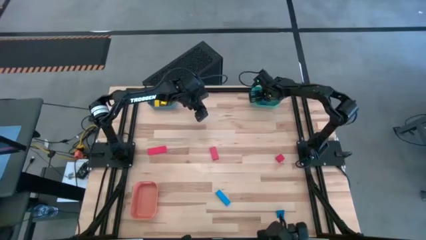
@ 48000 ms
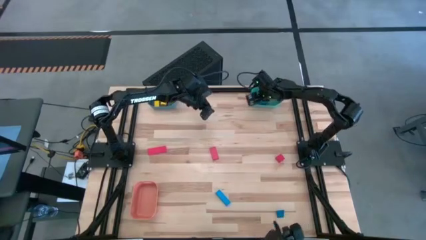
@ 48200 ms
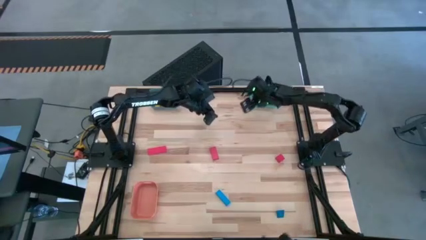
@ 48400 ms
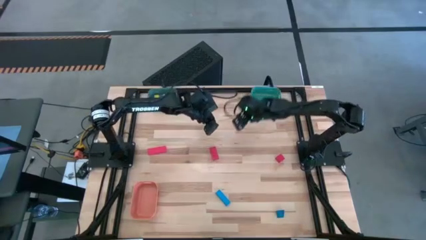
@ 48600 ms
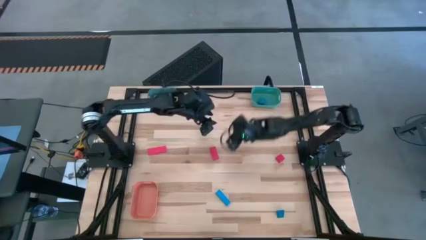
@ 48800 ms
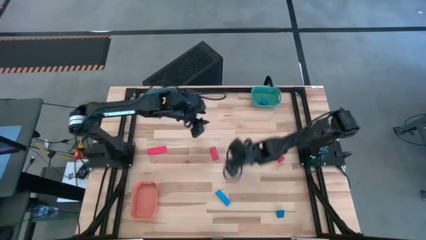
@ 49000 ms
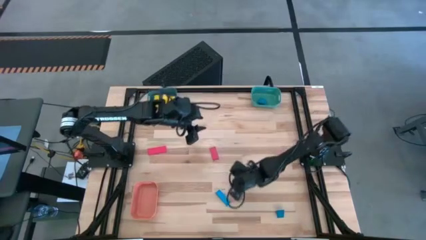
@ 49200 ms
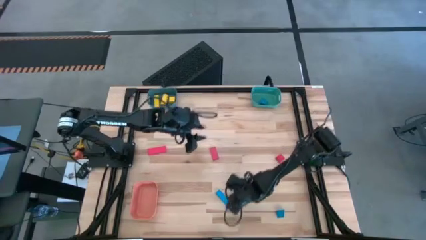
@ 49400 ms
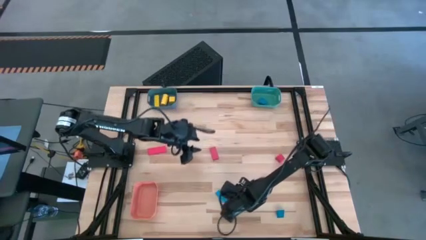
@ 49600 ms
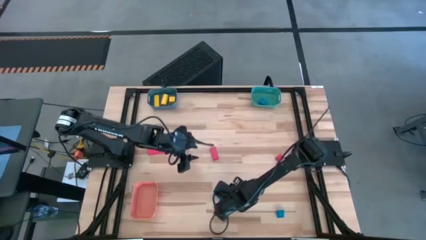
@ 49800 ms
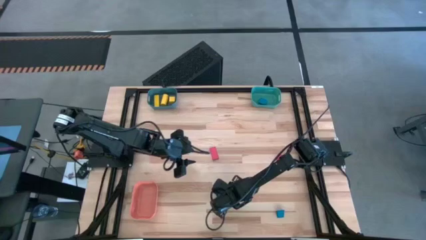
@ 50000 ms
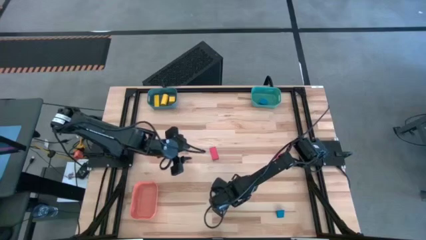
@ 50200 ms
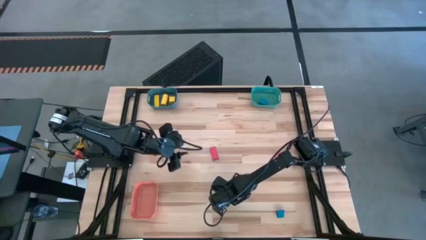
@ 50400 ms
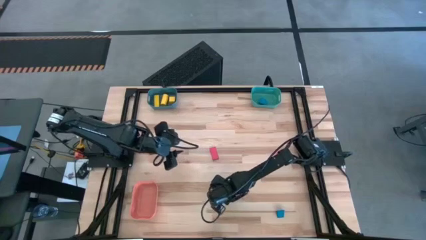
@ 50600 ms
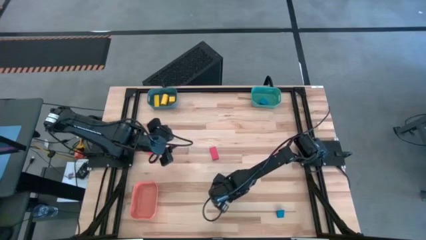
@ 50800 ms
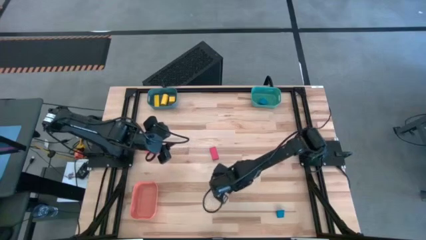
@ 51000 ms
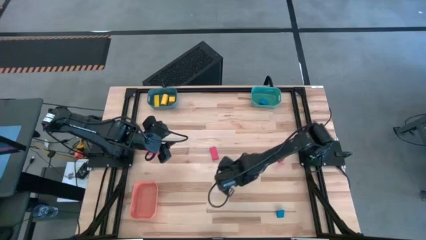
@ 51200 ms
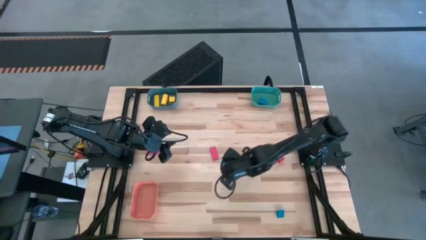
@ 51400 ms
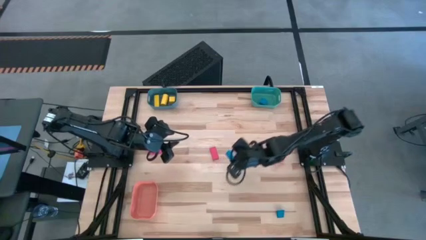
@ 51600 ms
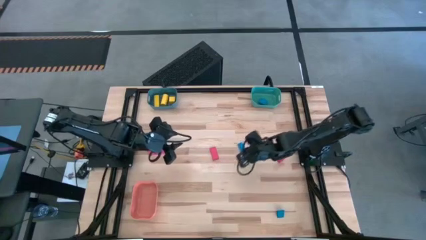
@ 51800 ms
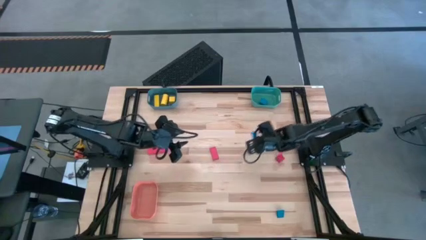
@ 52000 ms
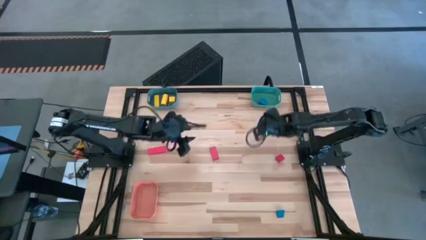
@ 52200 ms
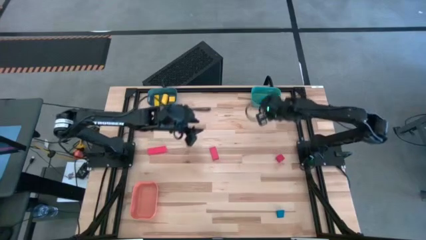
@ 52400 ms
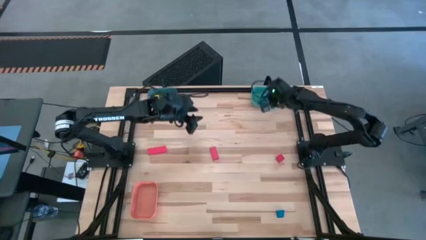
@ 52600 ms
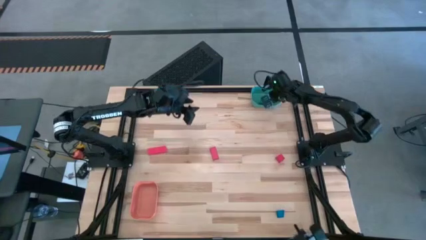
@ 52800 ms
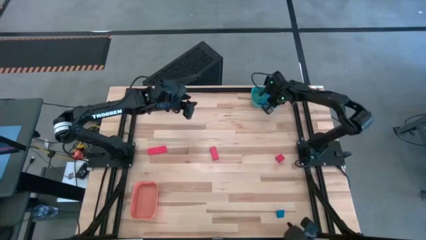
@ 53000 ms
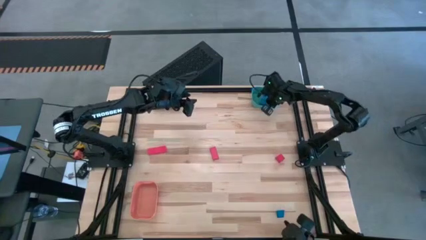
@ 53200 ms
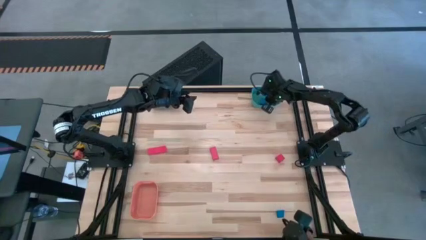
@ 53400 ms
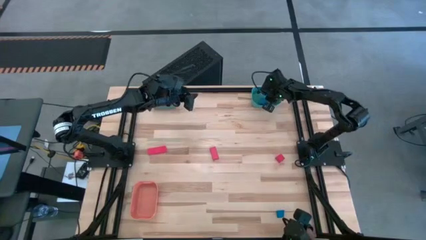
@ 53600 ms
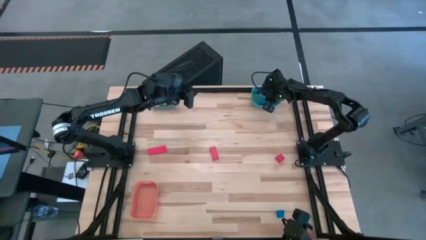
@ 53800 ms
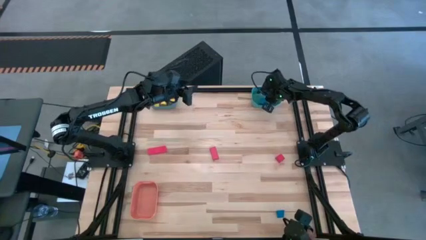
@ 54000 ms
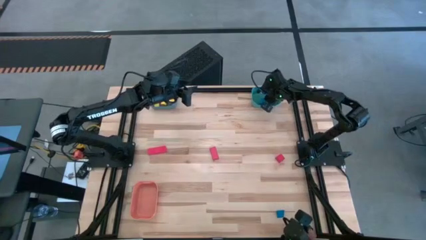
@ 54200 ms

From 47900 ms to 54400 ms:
Task: Sort & place blocks by color
Put the left blue block into the green bin

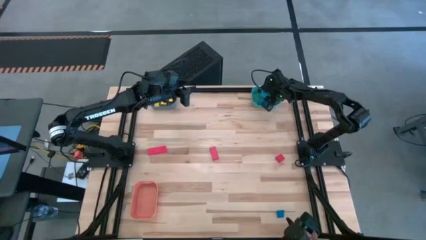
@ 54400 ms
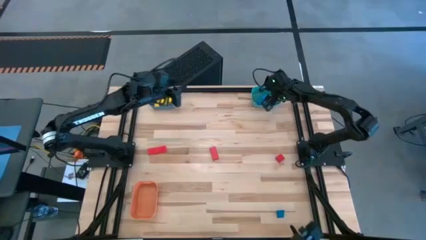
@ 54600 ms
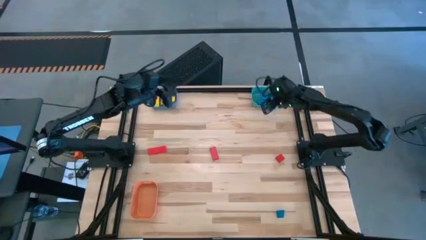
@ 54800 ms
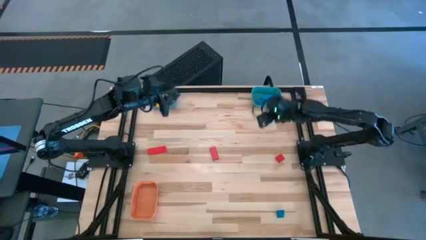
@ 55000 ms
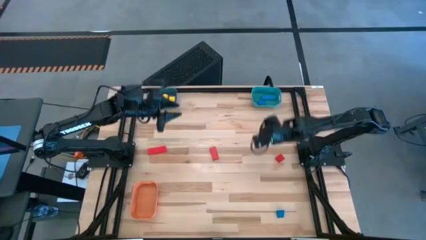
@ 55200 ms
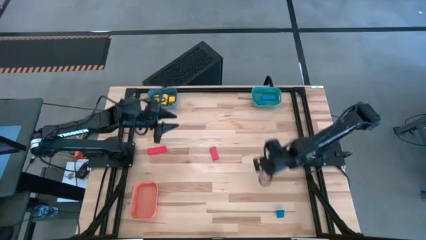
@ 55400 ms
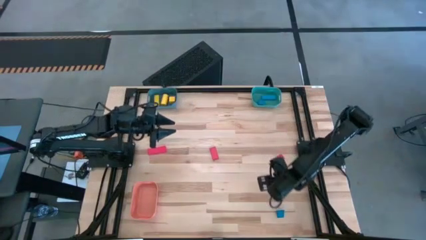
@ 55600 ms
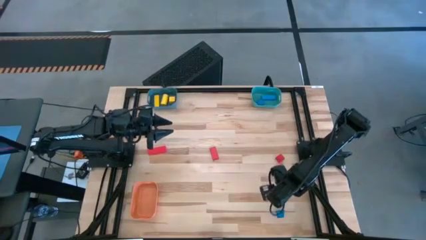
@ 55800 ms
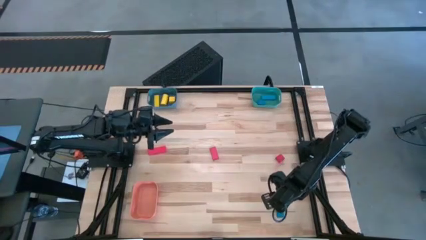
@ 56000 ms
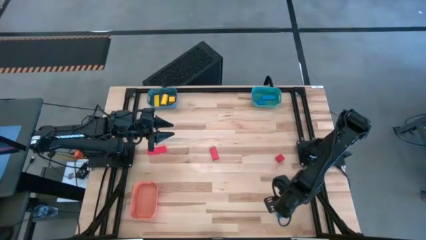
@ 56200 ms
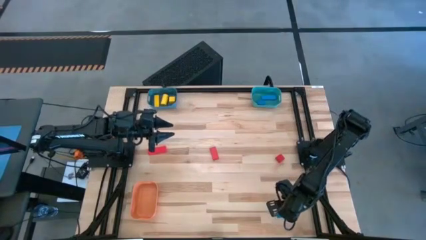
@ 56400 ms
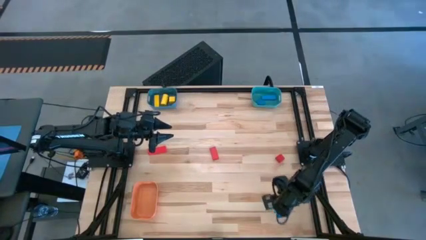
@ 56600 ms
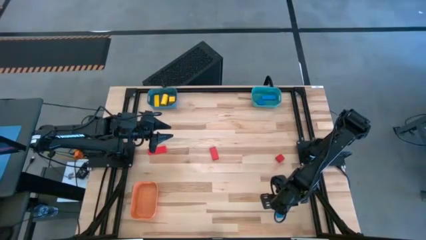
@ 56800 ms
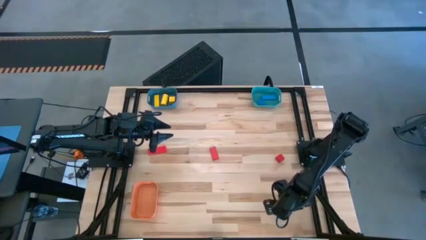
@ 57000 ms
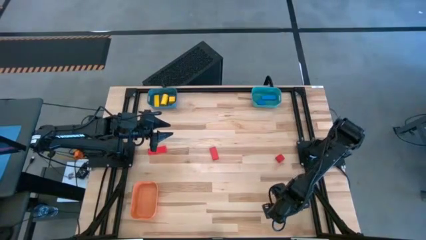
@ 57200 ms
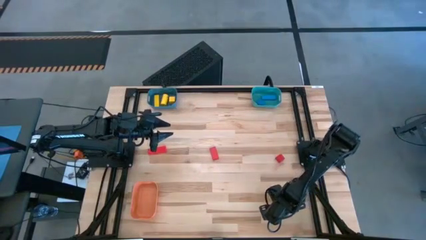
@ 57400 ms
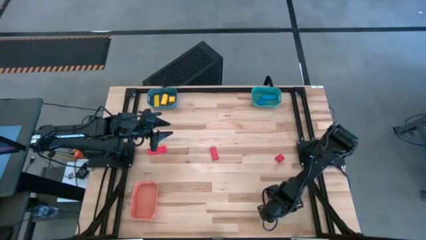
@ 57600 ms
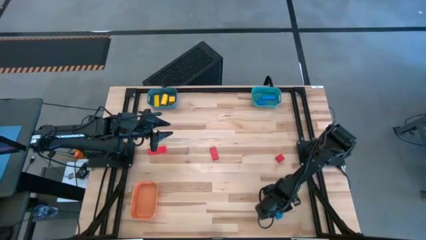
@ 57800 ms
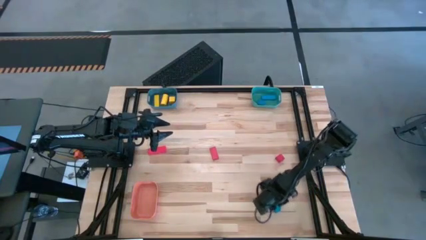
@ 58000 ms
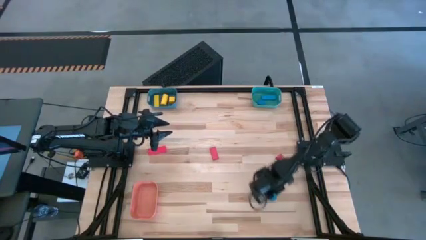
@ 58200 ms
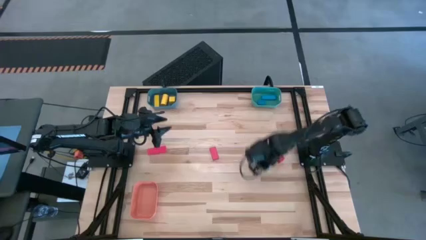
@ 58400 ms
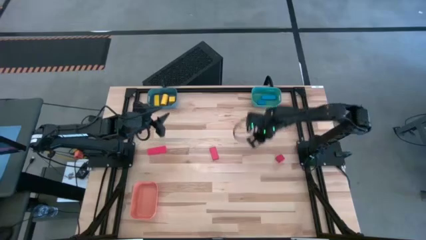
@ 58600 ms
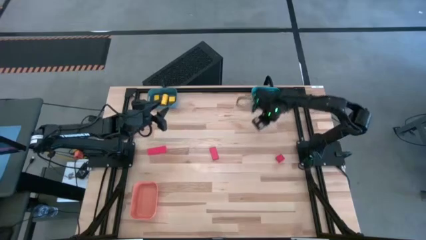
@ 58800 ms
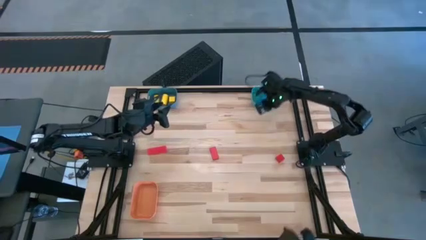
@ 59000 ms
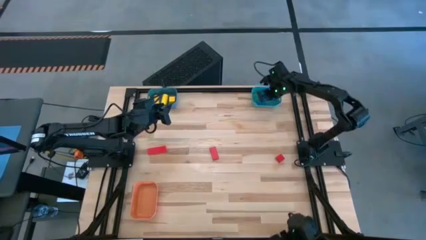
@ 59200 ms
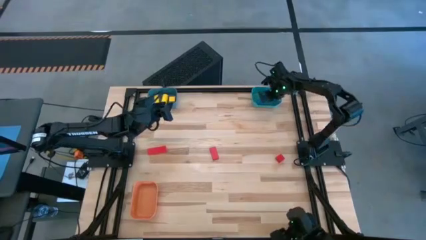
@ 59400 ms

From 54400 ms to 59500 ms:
Put the blue block into the green bin

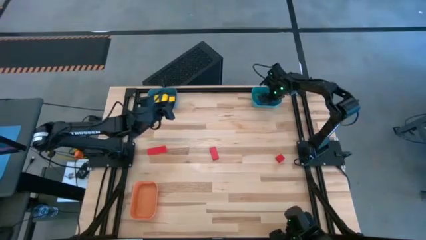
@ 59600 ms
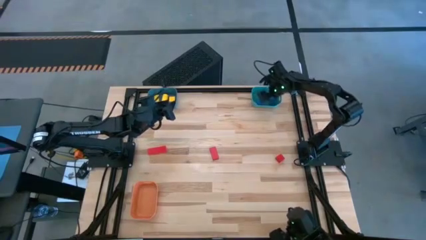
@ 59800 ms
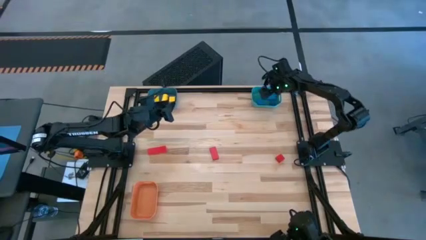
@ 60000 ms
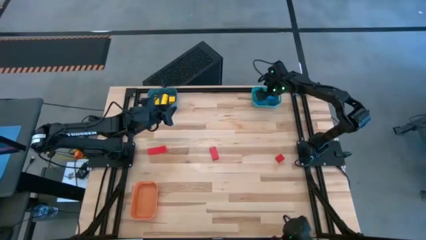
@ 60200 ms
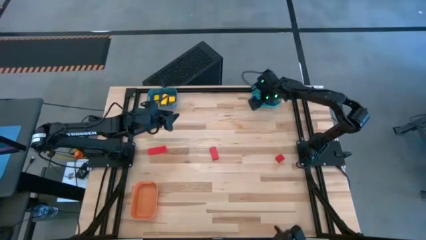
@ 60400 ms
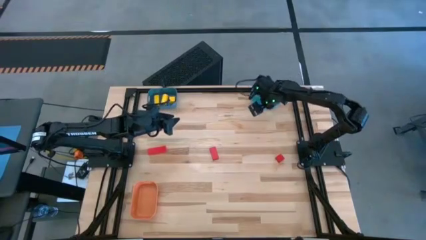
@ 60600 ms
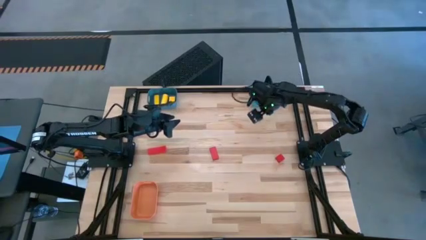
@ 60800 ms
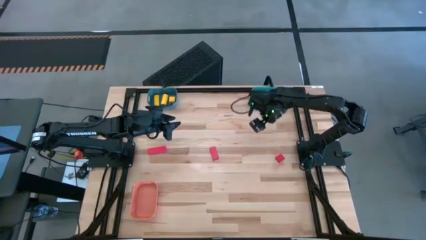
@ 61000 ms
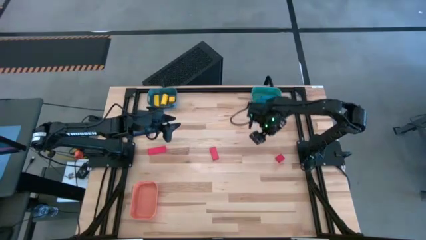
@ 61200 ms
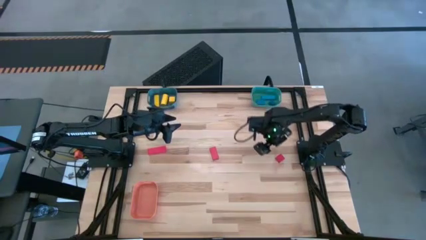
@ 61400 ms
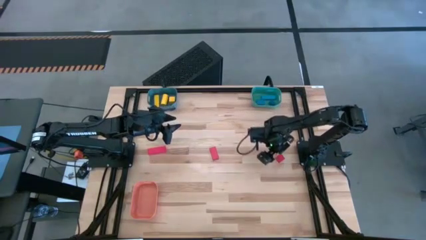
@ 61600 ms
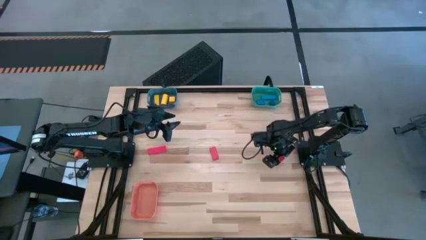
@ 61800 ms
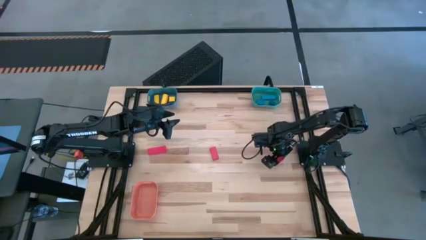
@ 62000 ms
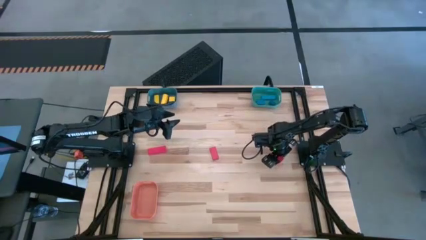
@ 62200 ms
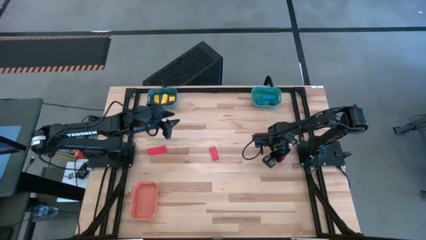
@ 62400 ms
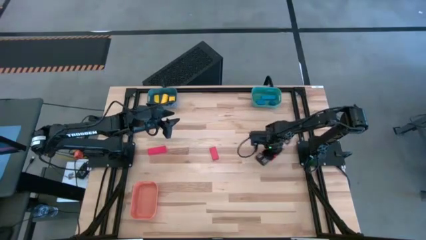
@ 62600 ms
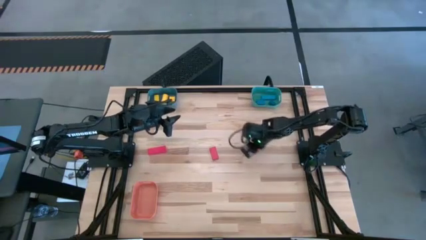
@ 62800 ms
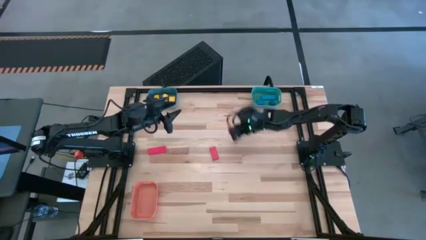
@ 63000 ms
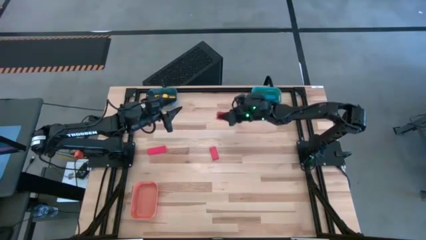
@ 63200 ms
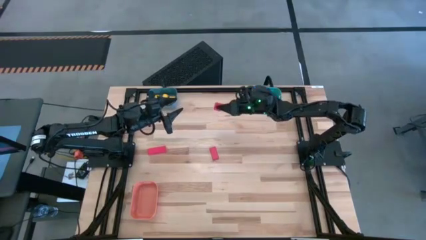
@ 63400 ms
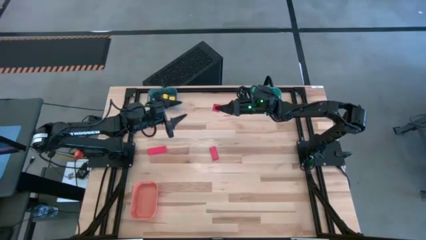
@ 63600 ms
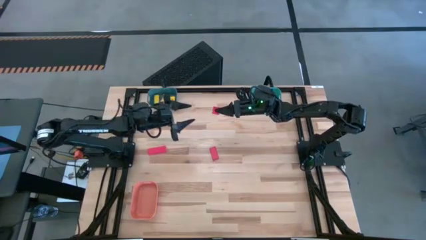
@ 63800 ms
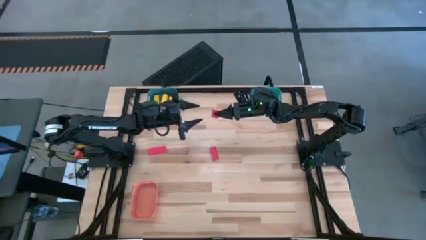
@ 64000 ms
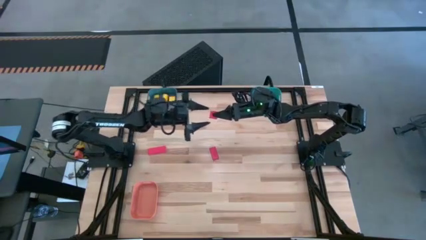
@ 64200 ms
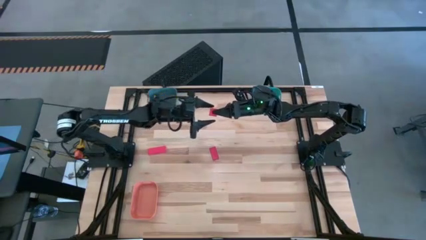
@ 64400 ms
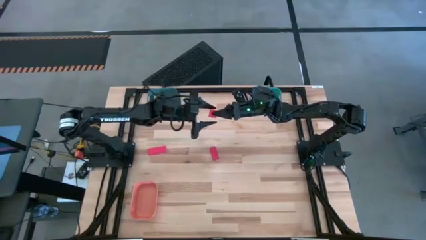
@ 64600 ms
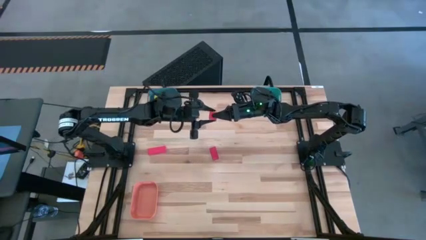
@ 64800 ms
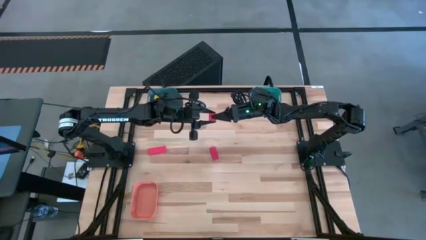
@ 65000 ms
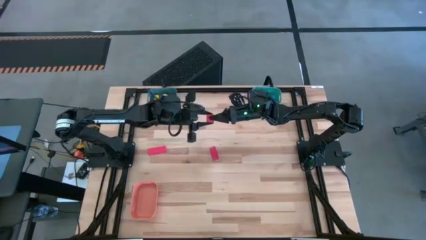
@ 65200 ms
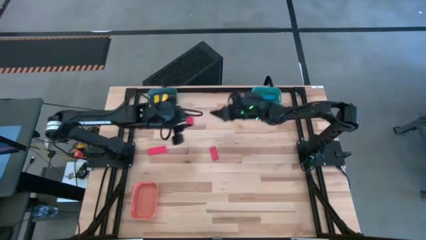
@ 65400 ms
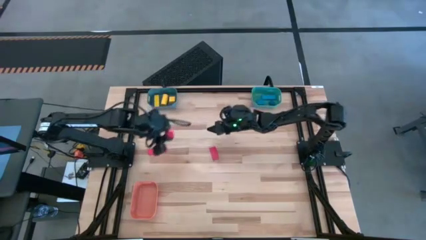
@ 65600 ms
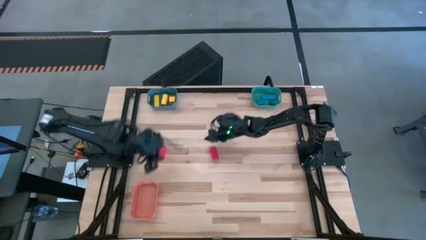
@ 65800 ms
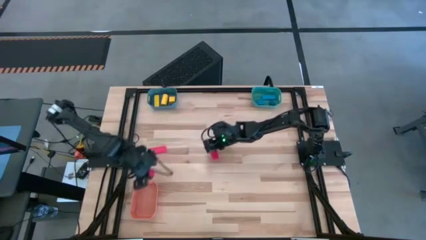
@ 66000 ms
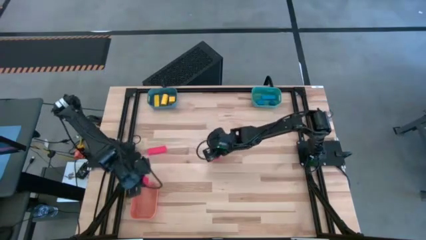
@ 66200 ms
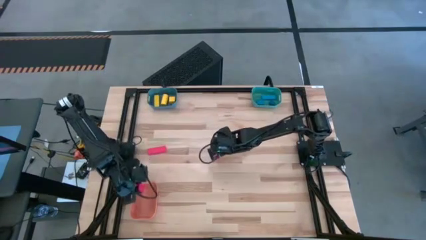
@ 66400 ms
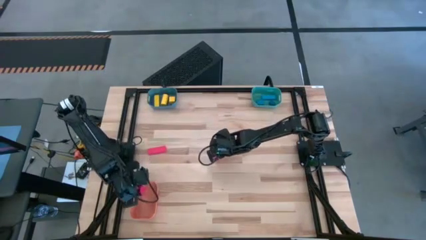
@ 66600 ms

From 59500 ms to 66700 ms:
Put the right red block into the orange bin
